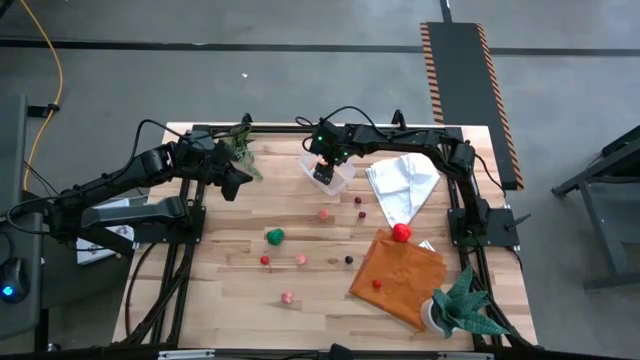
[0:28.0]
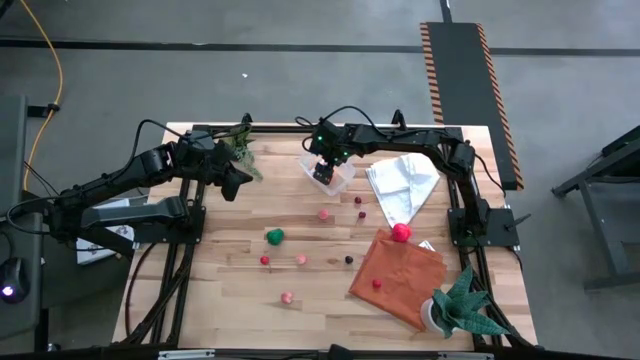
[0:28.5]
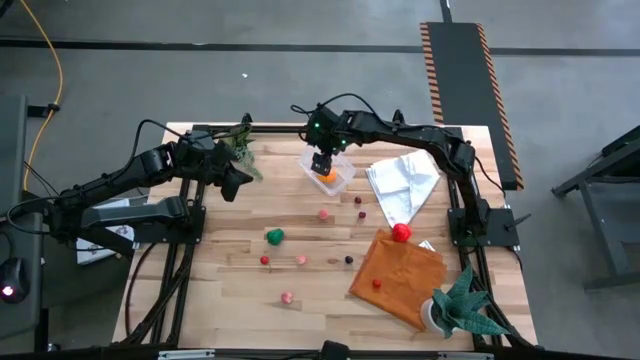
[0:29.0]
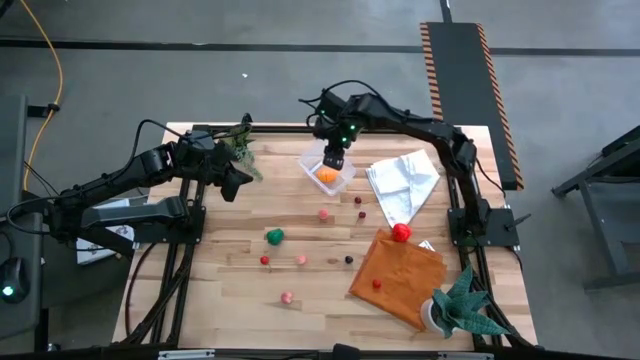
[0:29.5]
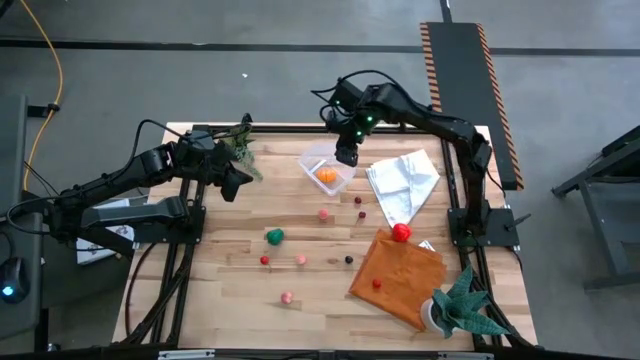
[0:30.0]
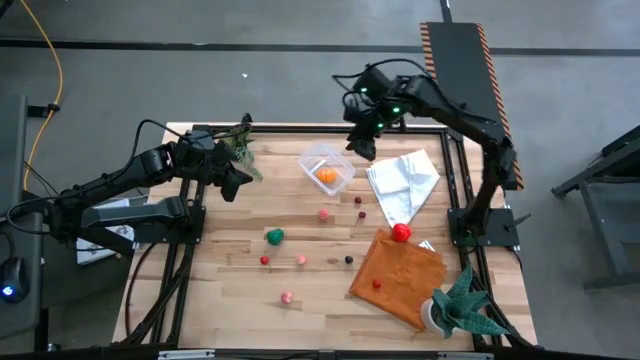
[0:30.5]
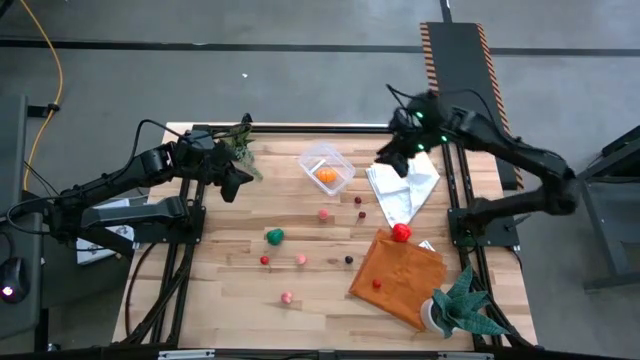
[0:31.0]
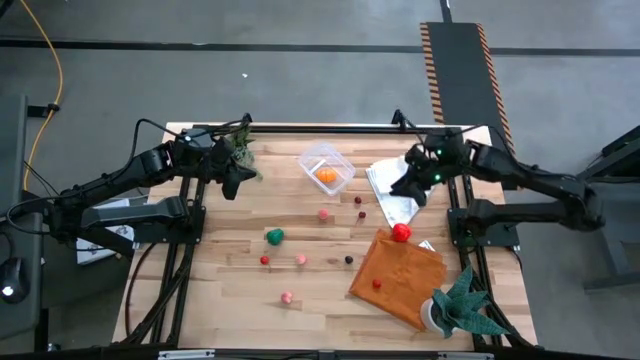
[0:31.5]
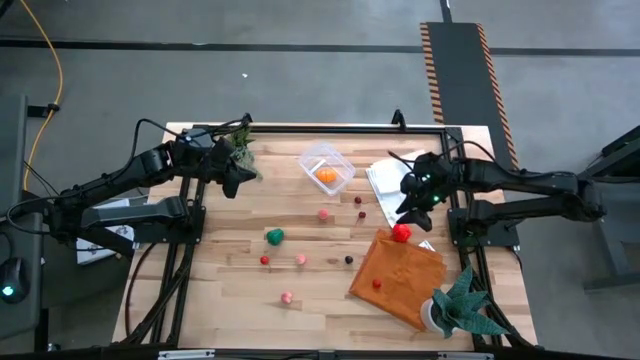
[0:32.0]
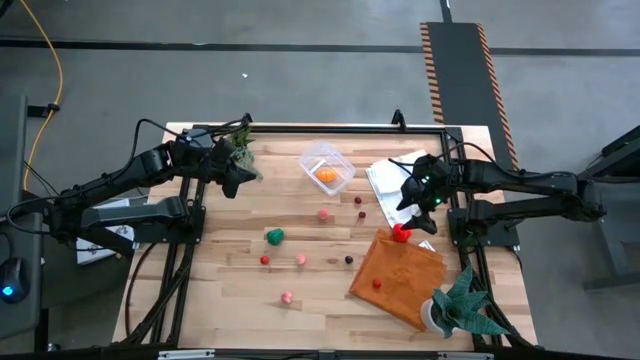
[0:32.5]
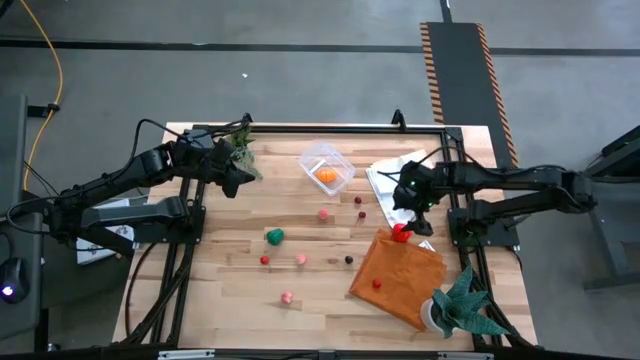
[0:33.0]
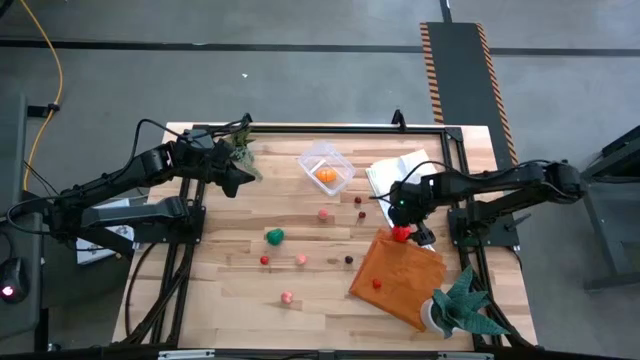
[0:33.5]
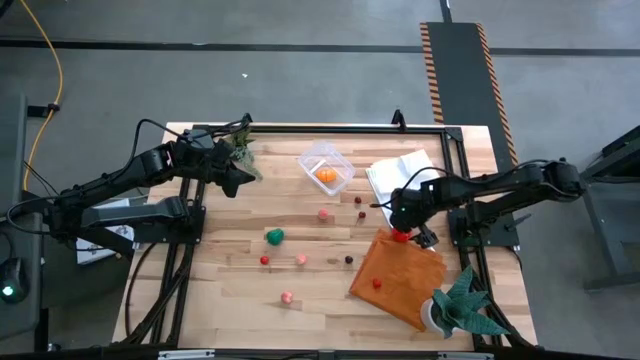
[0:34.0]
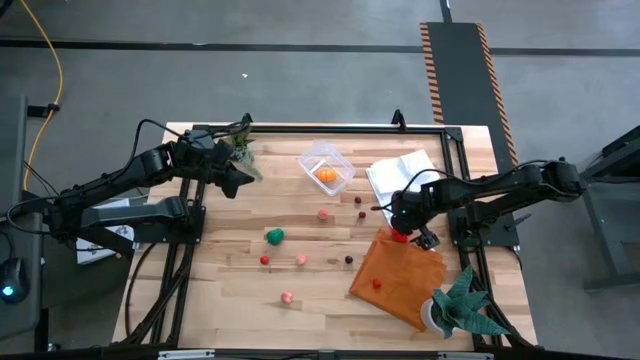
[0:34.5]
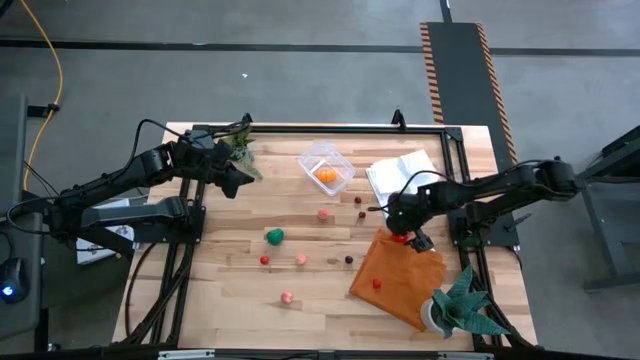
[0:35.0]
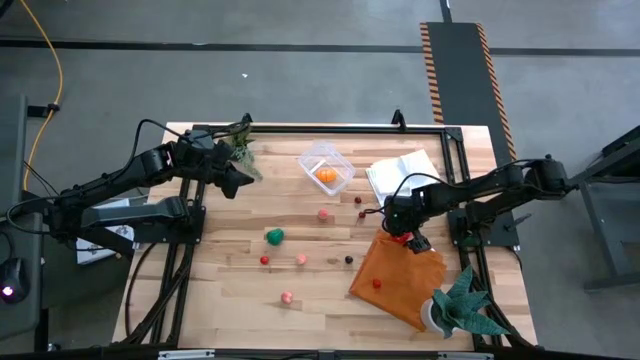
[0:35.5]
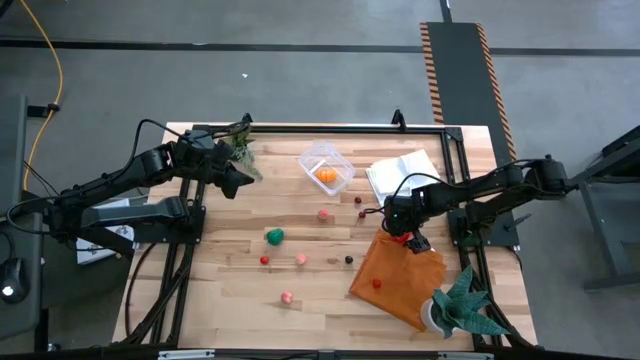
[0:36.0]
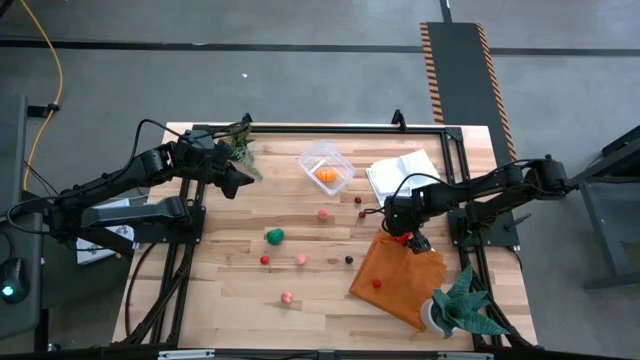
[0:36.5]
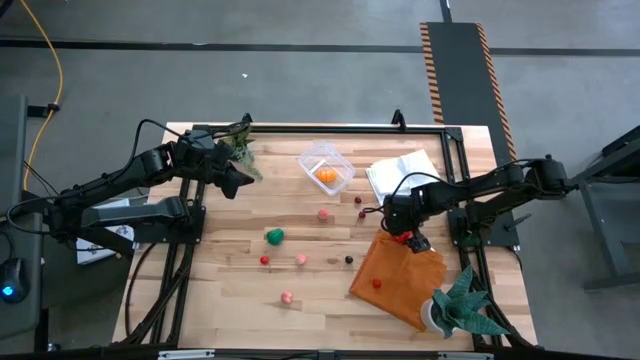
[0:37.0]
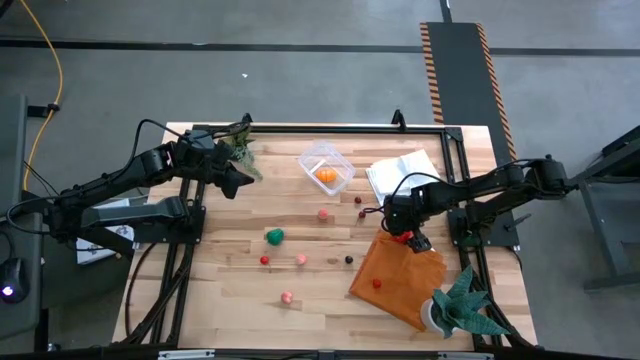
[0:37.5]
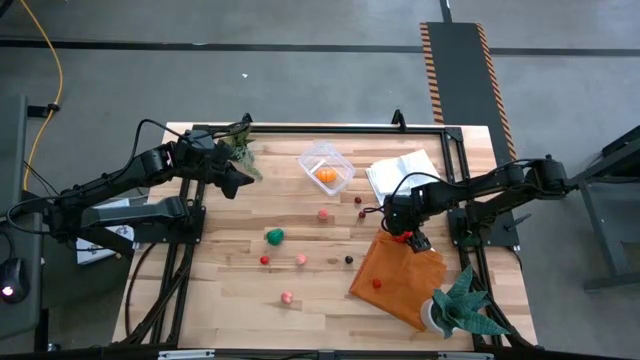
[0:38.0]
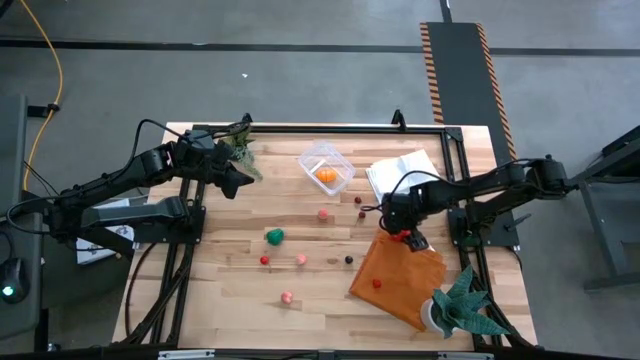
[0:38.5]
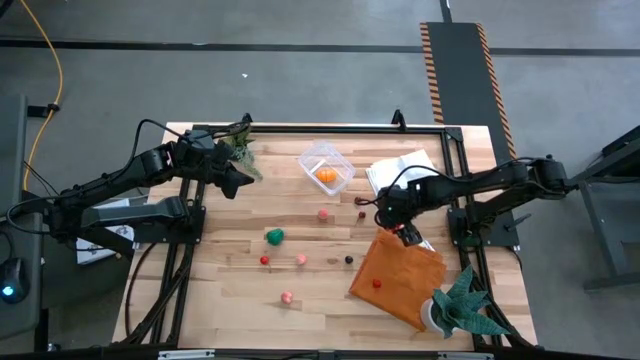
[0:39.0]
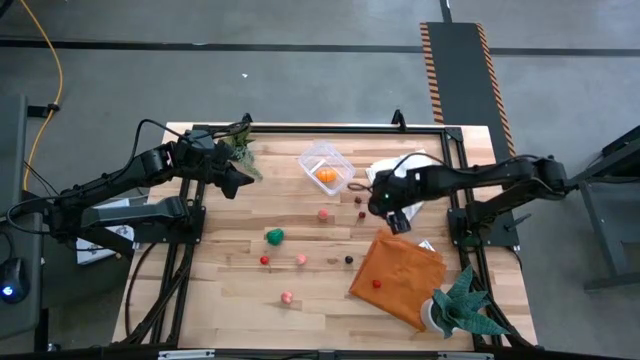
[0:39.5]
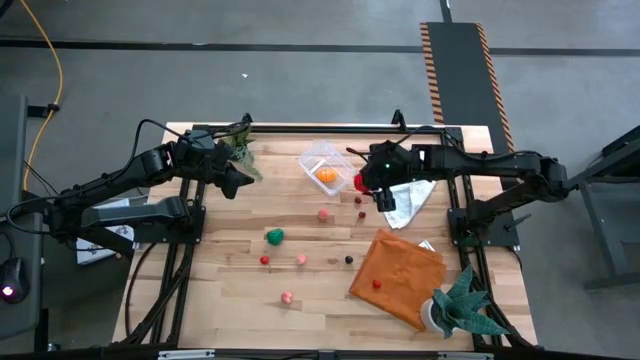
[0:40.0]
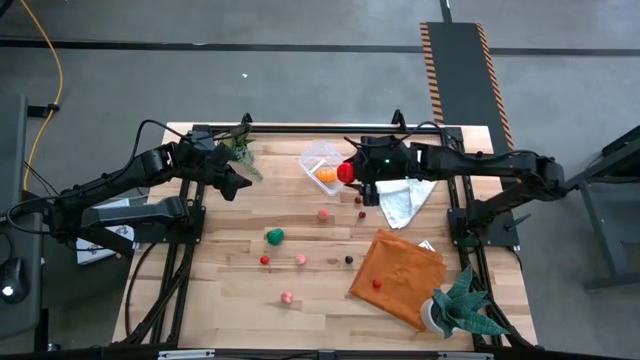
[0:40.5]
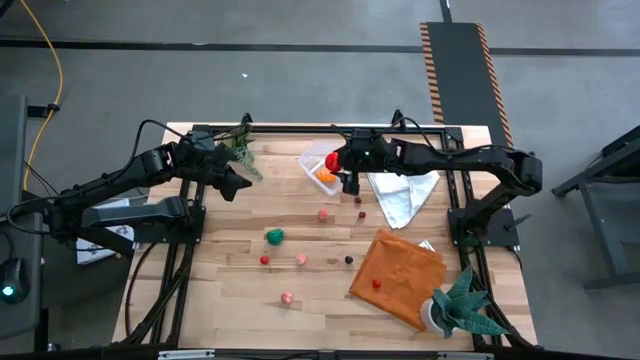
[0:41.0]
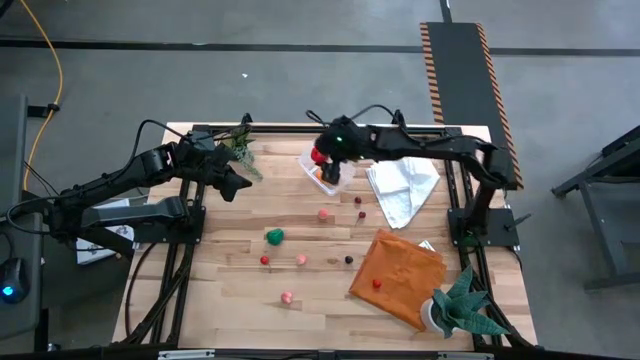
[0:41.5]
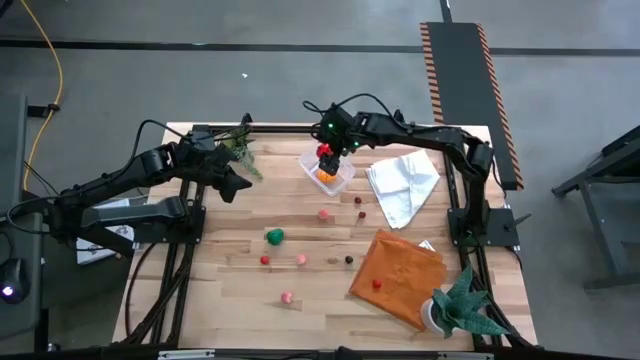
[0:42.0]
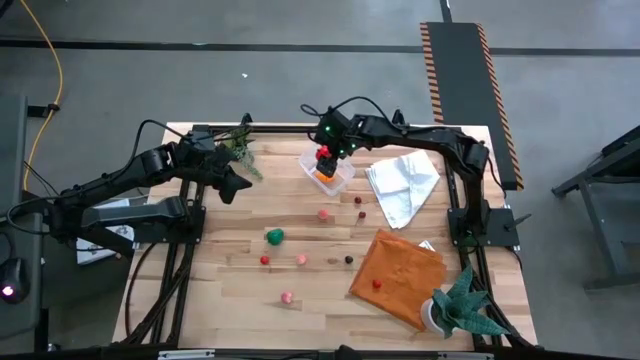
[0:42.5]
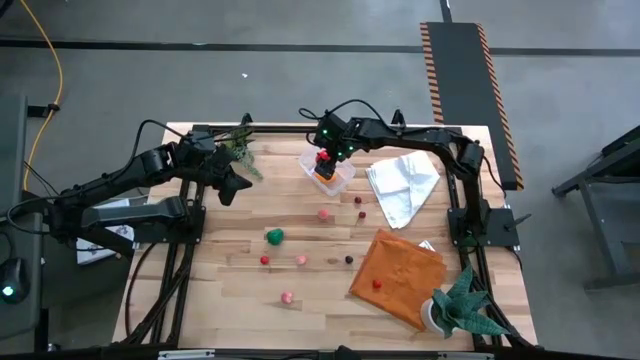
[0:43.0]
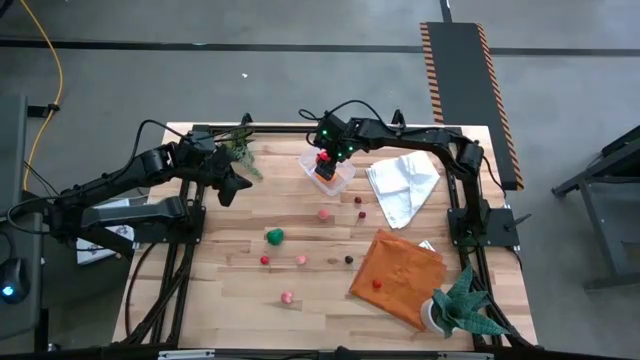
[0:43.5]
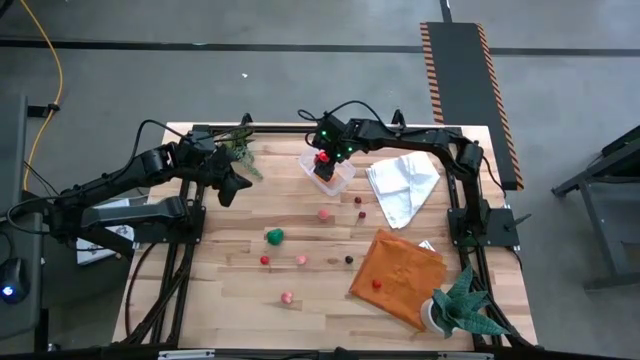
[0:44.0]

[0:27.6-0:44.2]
Task: Pick and placing Produce into tupperware
Put the red apple into the transparent bin

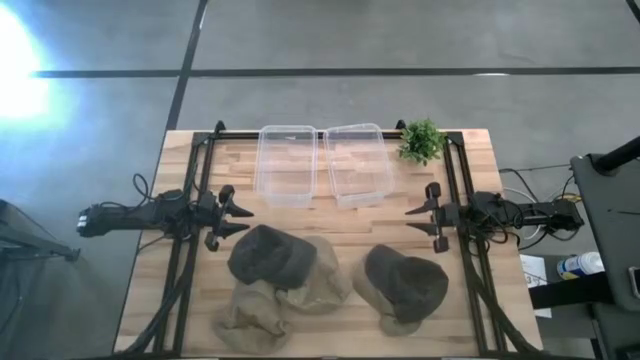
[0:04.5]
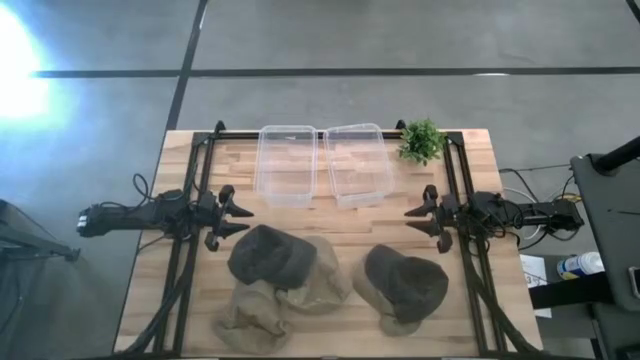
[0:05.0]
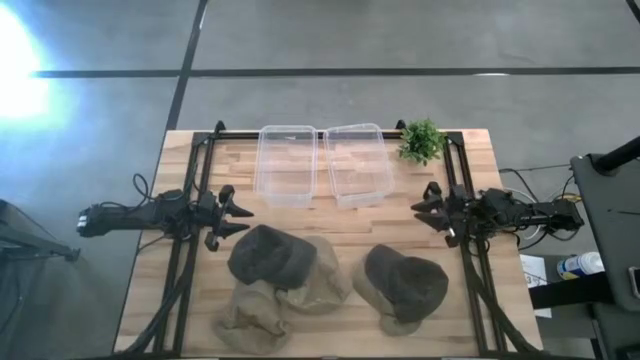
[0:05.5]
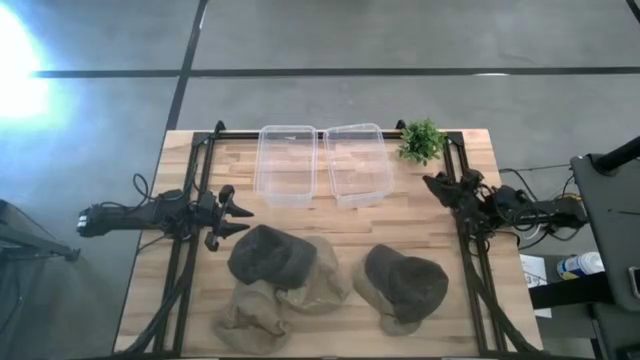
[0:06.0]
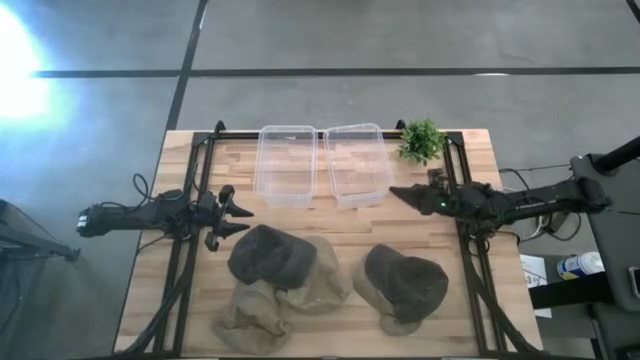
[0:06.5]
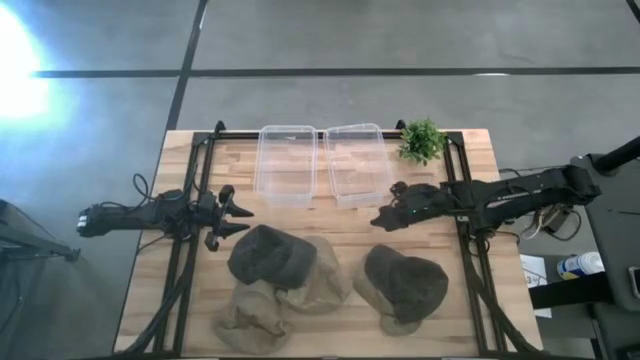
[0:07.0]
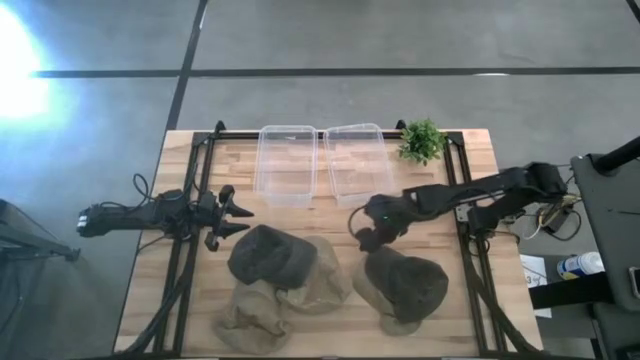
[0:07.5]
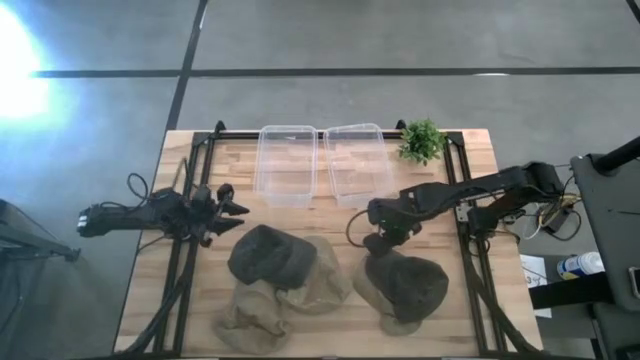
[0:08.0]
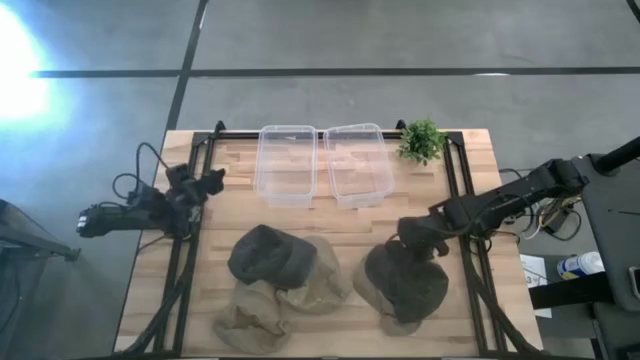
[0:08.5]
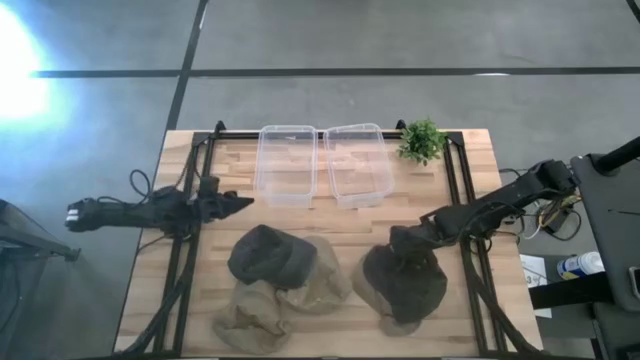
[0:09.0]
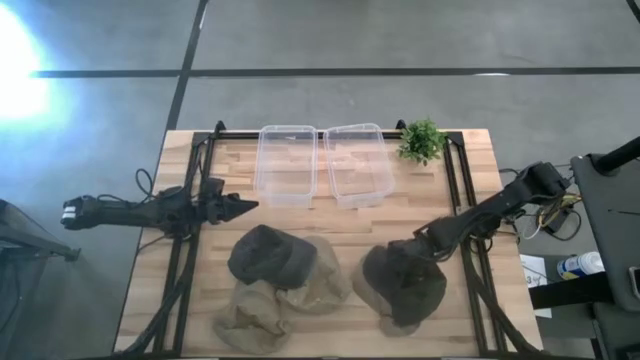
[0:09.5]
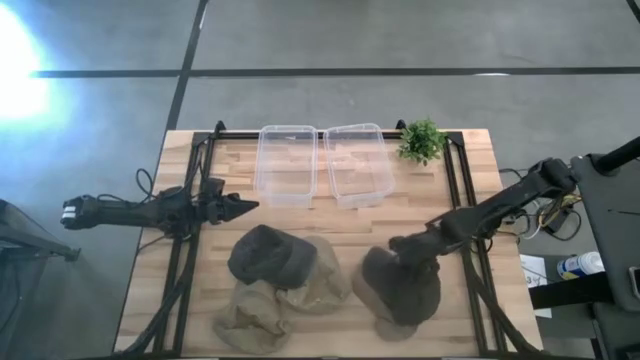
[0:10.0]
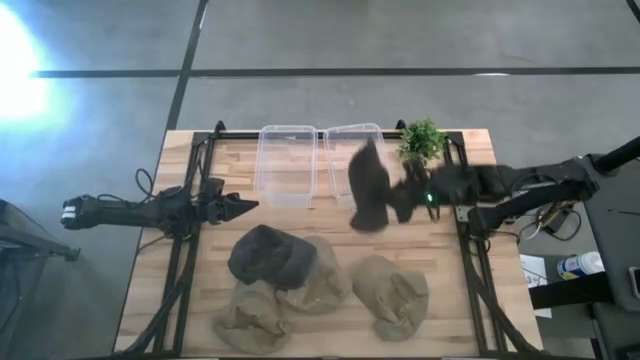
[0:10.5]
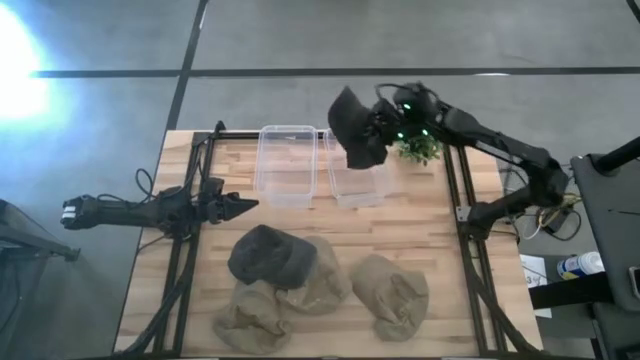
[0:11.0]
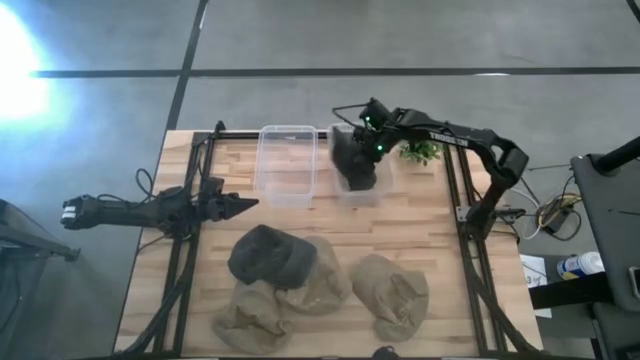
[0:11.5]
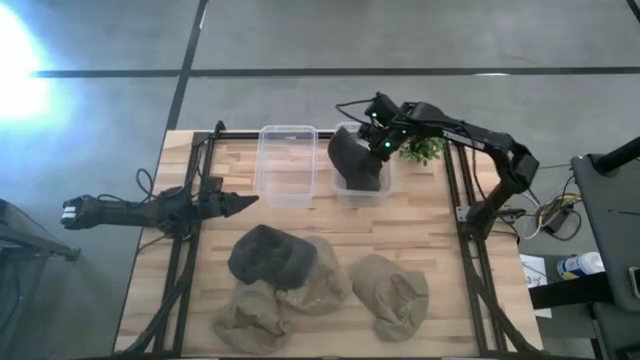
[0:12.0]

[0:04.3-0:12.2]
Task: Pick & Place hat
Put the right black cap into the right transparent bin
